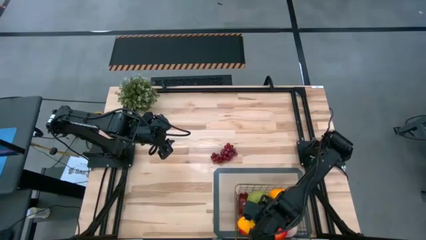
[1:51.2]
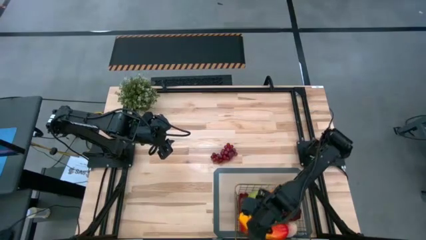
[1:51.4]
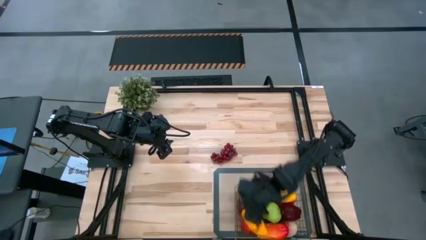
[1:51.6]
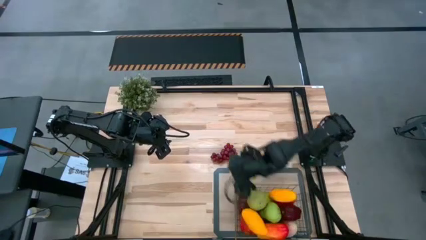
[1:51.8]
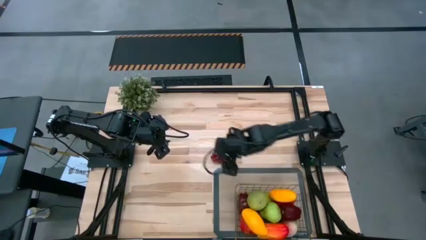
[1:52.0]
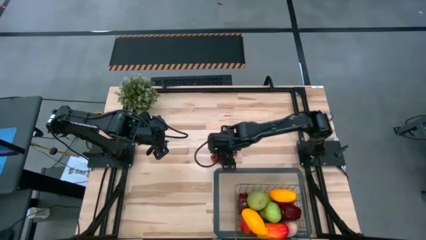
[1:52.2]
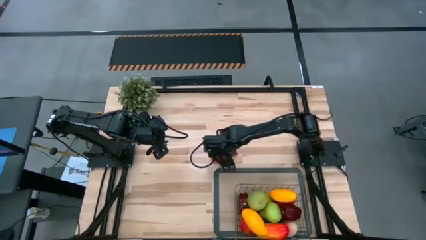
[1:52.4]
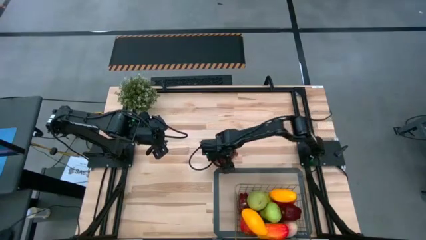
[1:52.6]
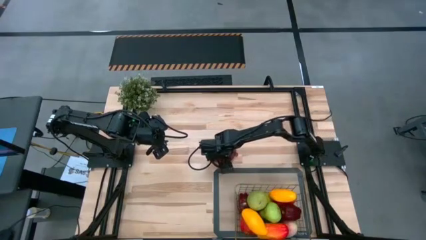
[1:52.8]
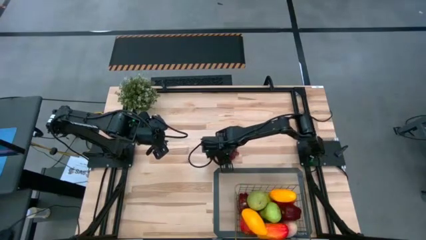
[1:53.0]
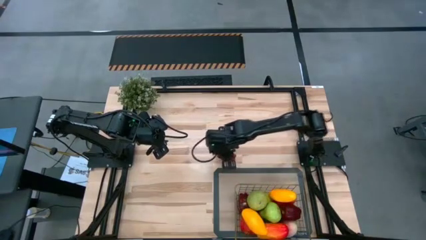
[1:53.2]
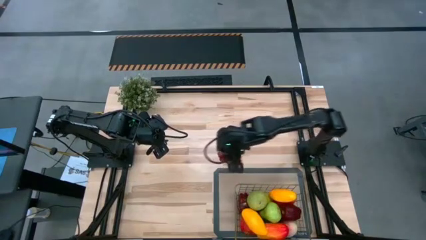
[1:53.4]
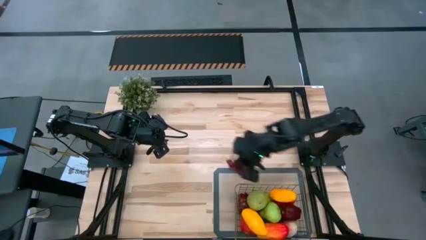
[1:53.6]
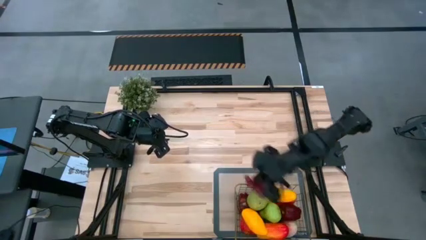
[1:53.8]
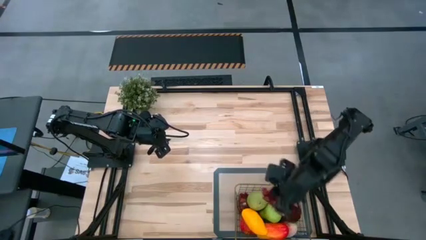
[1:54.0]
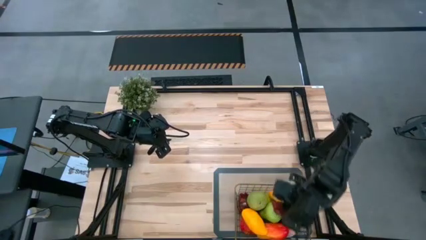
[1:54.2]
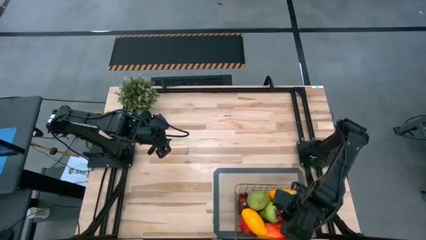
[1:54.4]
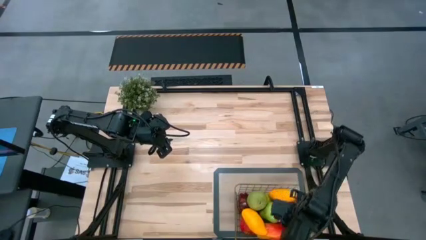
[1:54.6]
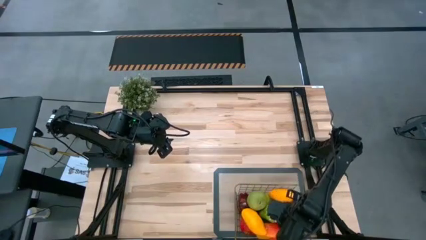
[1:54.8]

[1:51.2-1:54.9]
Task: Build produce basket
Put the red grapes into the wire basket

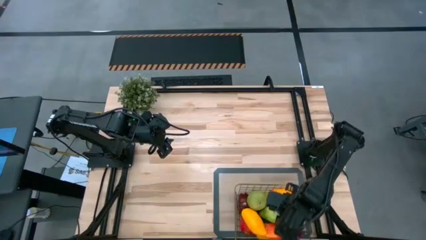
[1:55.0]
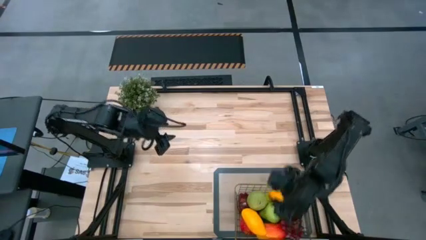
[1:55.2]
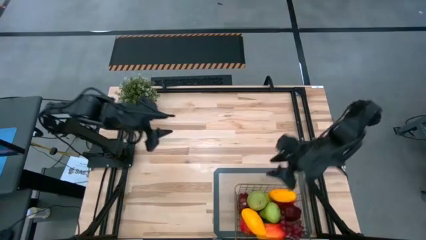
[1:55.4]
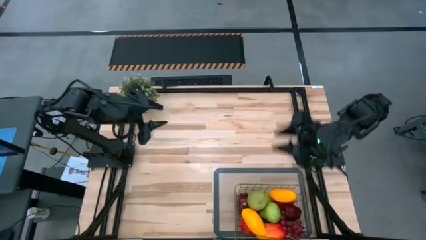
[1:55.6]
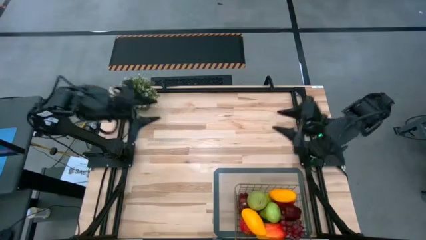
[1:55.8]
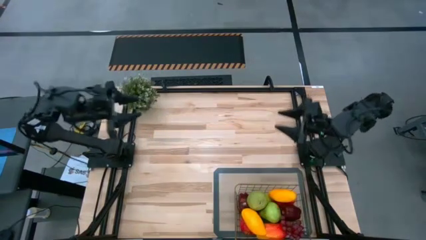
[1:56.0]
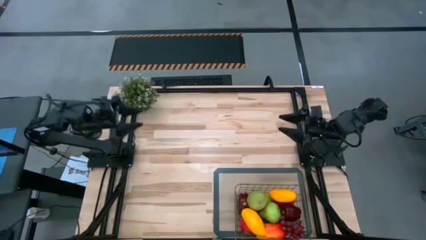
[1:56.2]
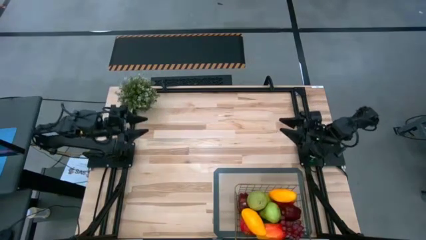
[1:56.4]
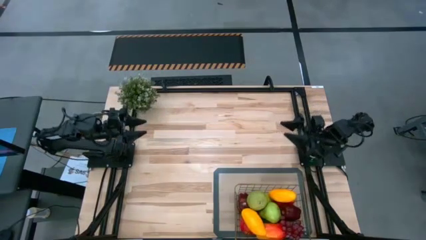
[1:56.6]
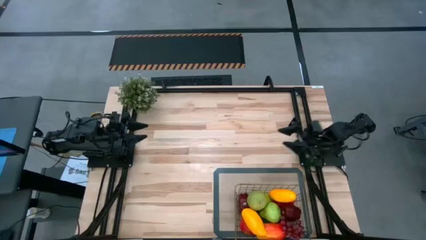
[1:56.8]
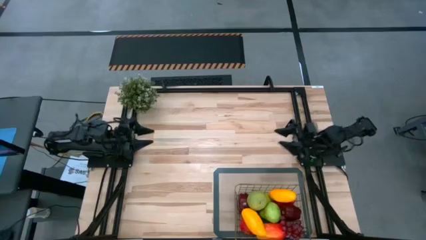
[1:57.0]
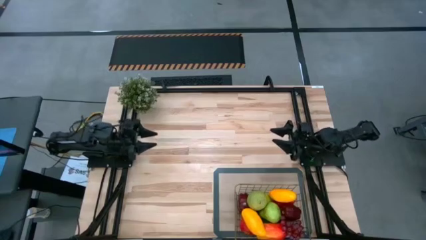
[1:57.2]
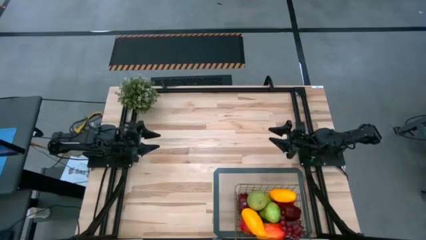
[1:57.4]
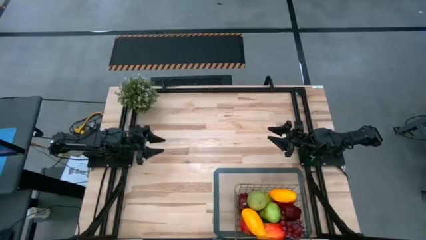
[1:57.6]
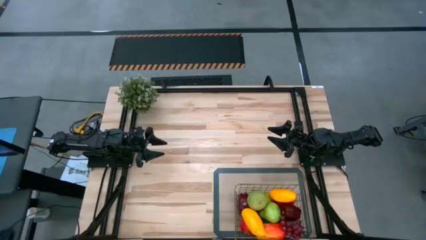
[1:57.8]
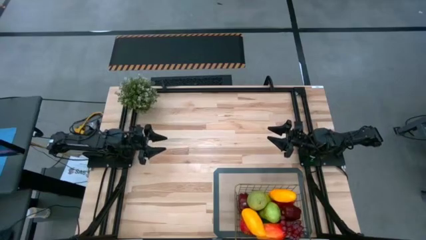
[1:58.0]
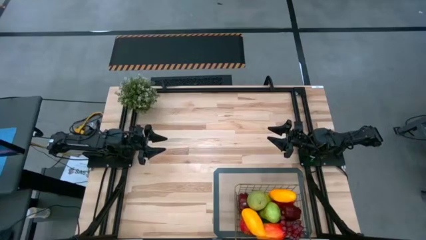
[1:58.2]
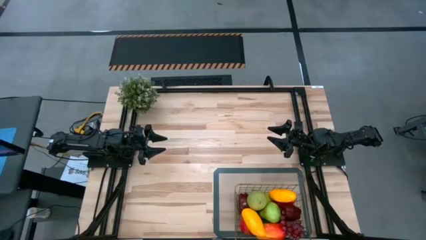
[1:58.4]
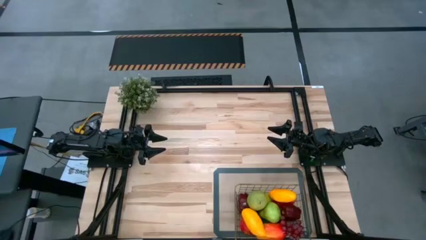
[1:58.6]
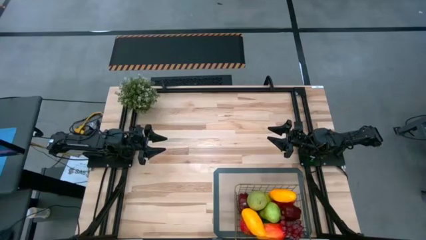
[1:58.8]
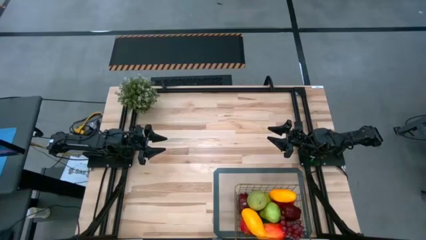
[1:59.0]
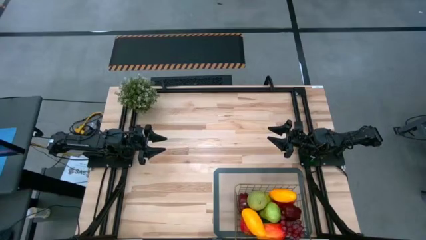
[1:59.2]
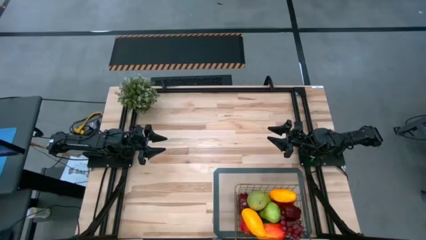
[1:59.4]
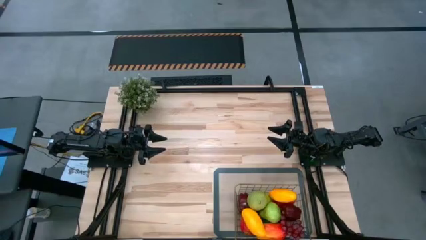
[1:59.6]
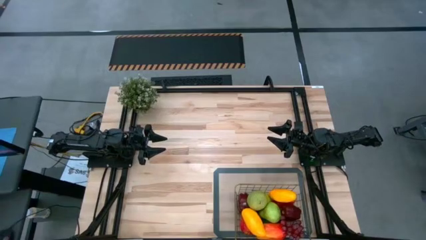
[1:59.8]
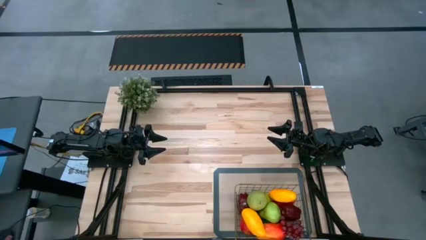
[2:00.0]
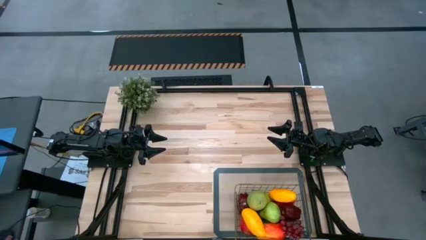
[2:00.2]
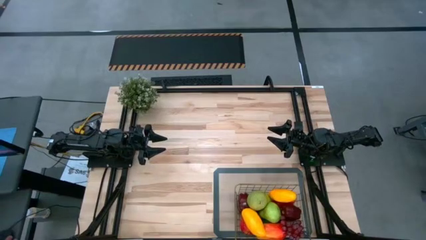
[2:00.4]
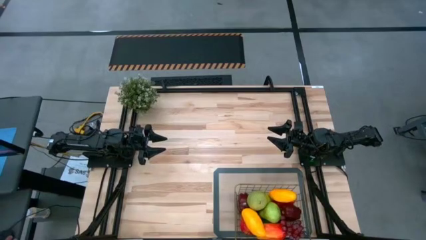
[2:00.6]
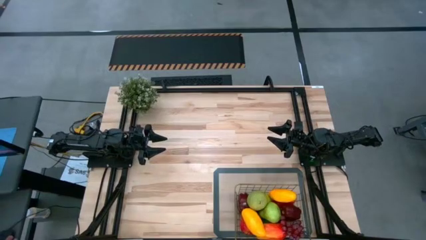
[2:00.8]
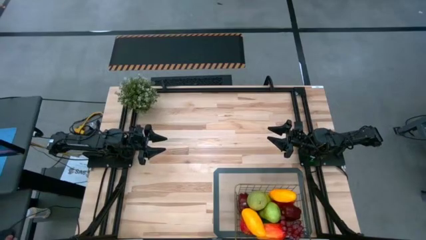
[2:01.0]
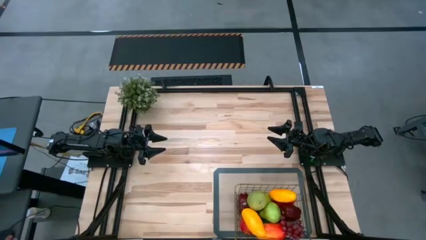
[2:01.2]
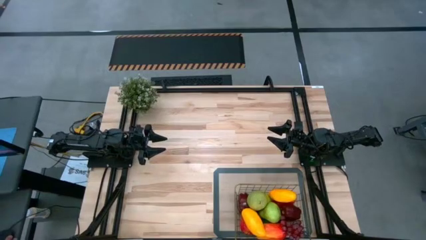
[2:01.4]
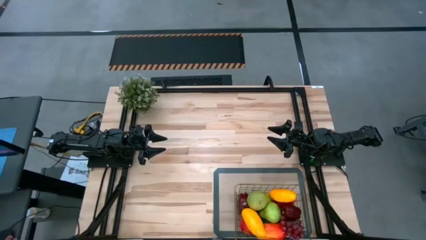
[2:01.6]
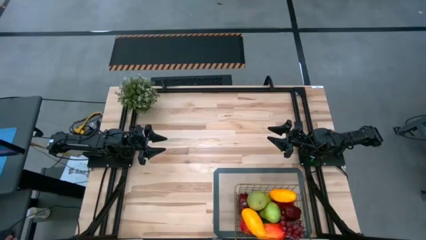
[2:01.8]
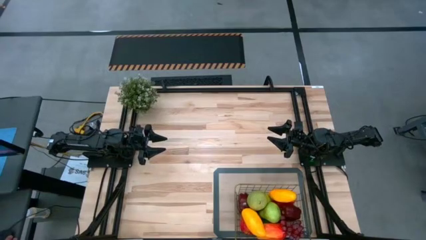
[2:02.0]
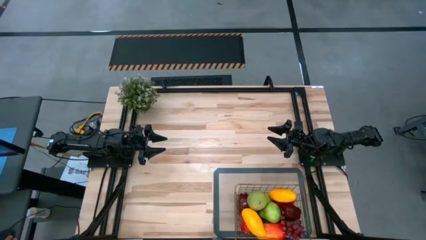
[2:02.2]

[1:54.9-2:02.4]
Return to Home Position

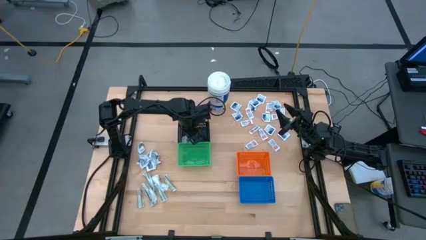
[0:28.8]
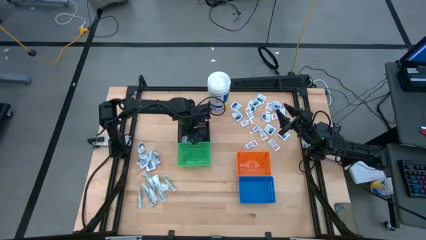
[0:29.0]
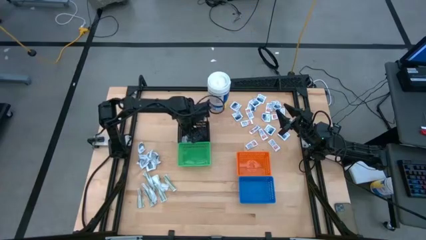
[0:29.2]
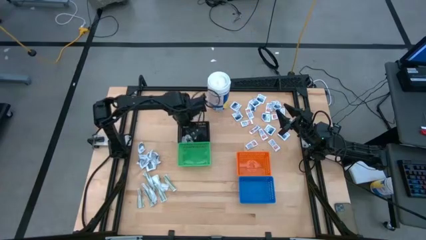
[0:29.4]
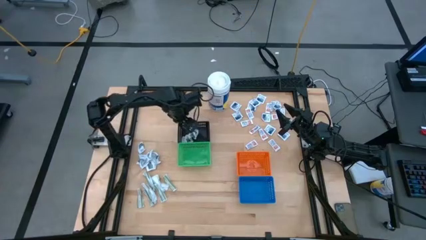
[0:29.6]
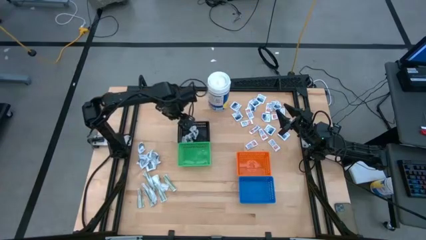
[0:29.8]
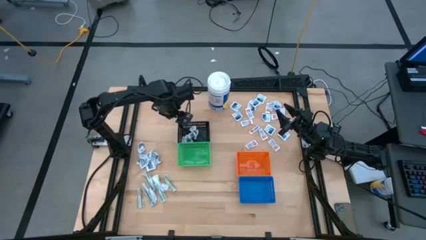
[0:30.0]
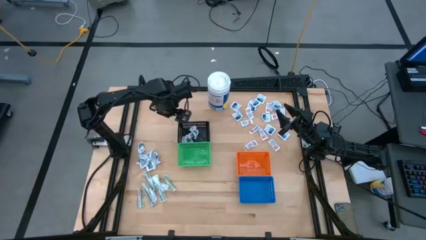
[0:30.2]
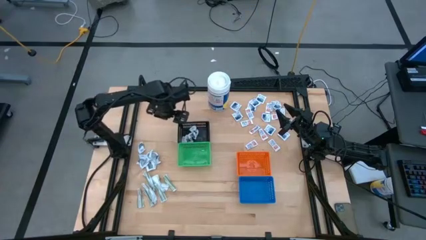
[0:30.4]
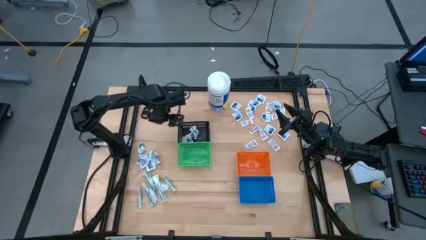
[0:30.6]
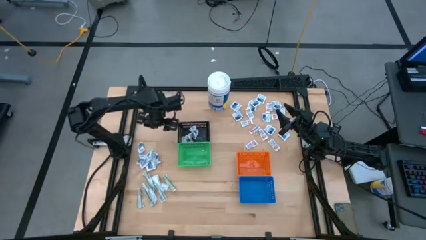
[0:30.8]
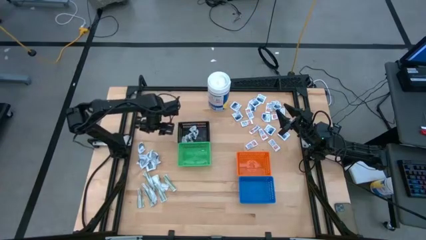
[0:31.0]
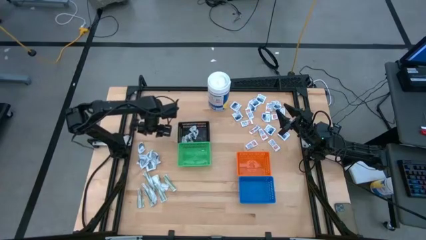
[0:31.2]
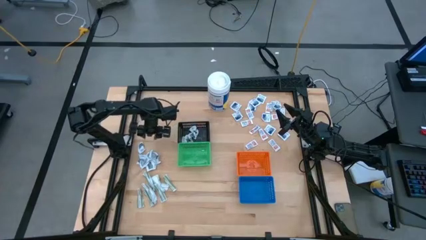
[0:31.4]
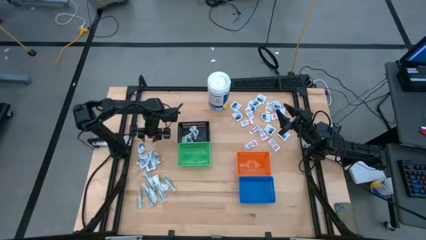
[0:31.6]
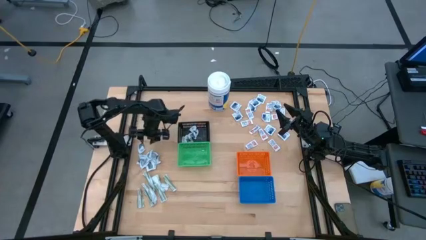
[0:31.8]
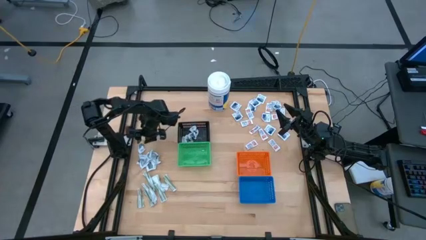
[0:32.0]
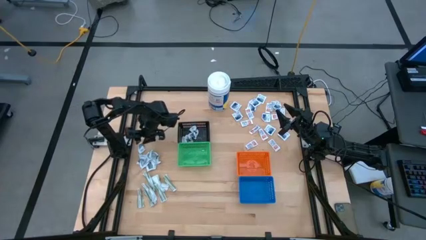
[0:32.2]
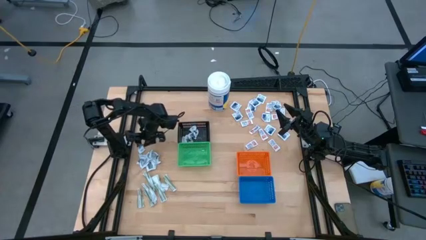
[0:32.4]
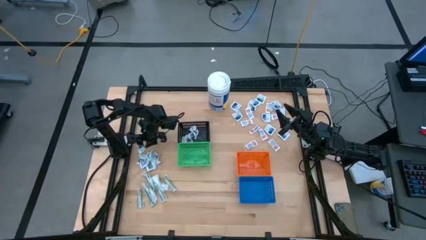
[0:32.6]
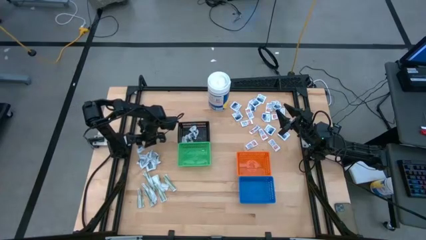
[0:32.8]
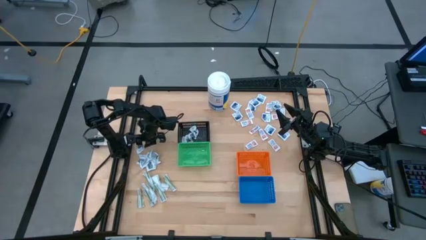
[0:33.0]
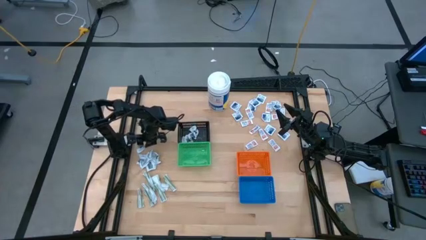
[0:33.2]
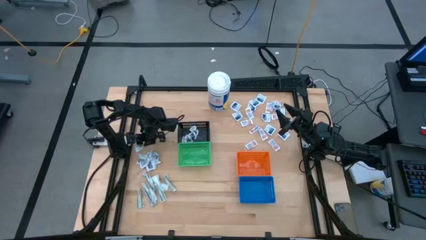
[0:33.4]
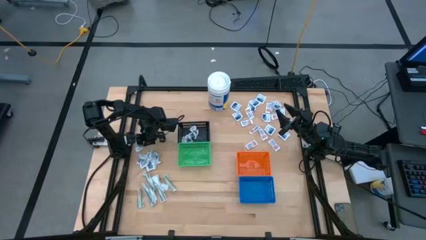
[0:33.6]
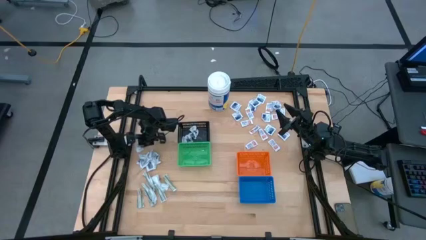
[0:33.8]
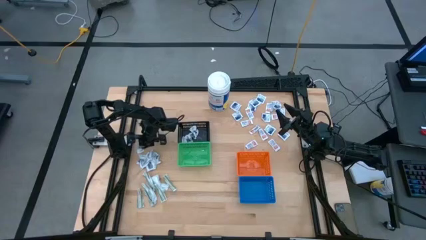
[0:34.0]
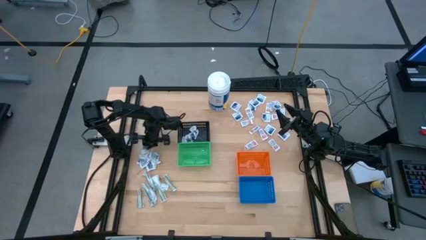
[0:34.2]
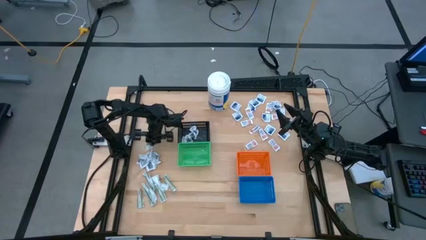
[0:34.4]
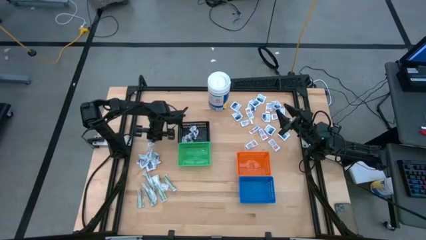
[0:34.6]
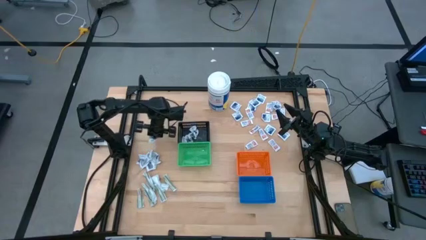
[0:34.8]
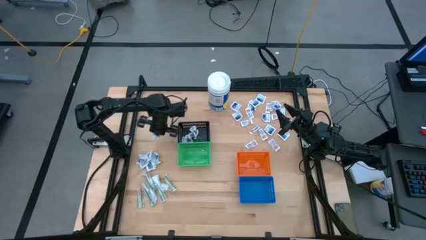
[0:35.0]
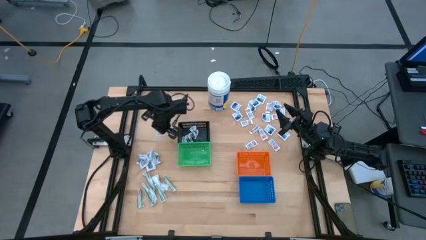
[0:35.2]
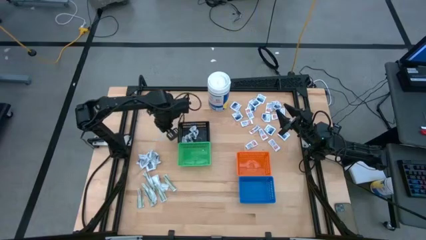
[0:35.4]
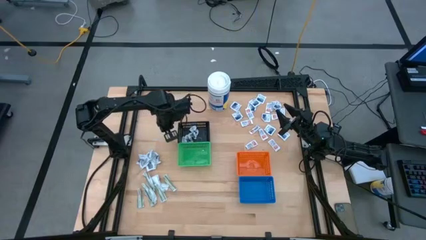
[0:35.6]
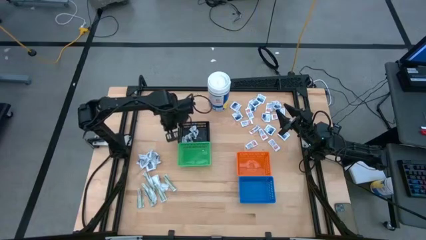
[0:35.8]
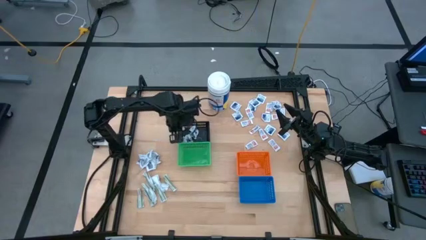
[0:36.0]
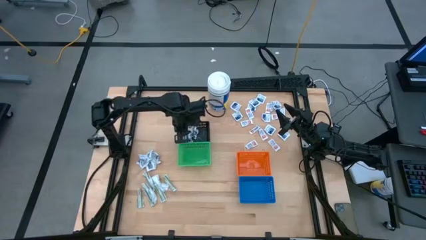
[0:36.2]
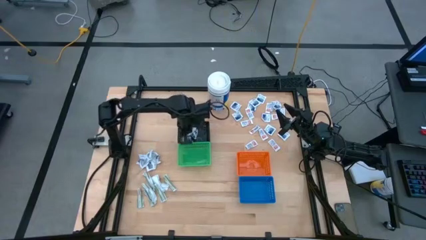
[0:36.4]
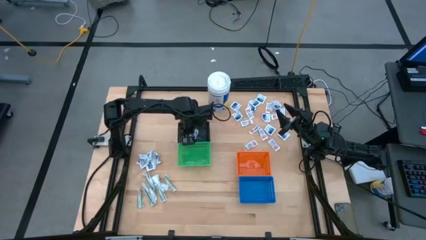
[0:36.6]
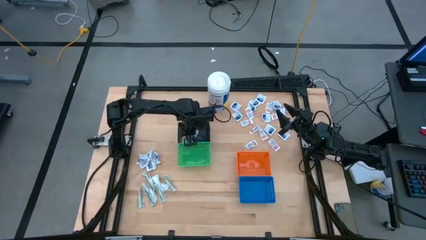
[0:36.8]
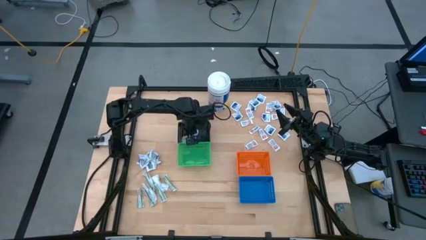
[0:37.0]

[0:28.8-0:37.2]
Task: Pick & Place First Aid Supplies
Put the black pad into the black bin
